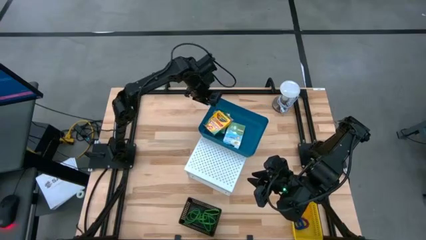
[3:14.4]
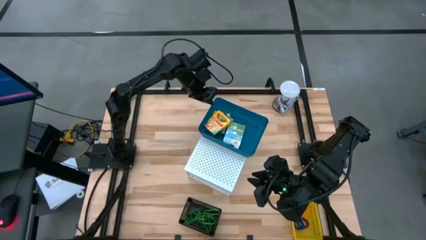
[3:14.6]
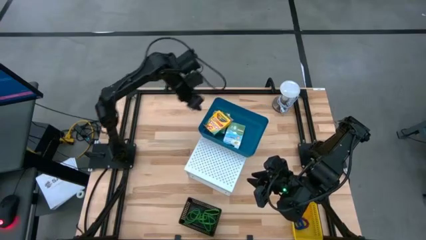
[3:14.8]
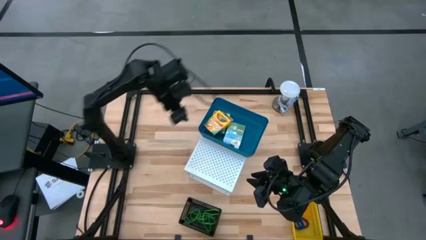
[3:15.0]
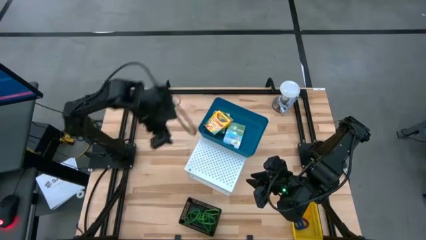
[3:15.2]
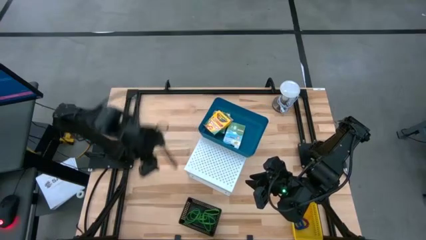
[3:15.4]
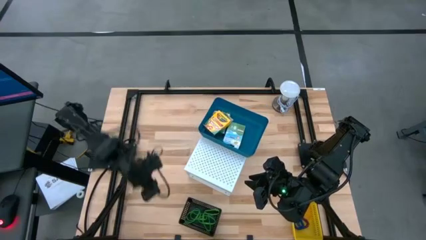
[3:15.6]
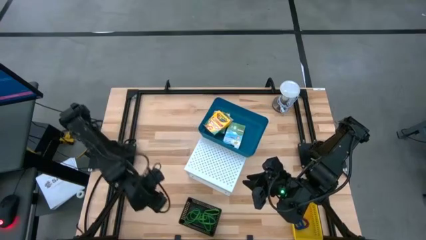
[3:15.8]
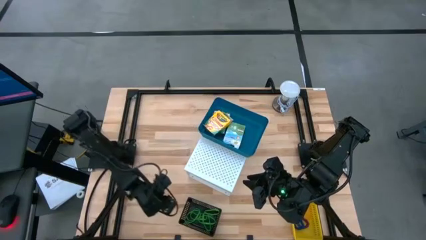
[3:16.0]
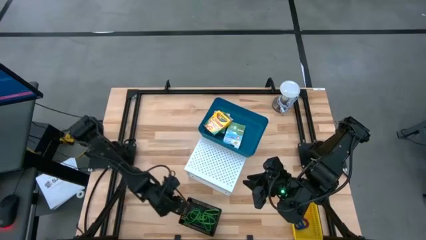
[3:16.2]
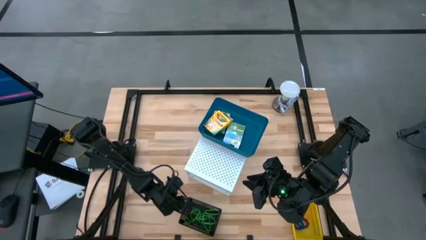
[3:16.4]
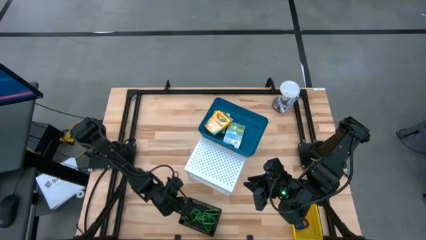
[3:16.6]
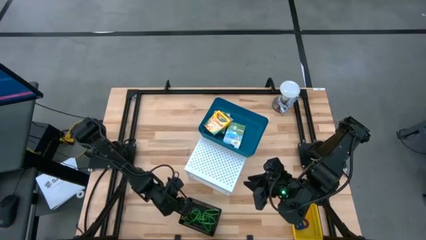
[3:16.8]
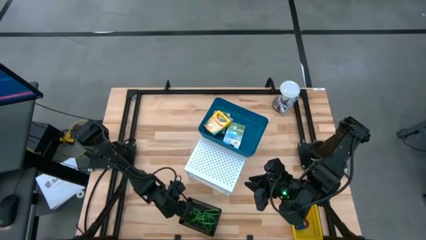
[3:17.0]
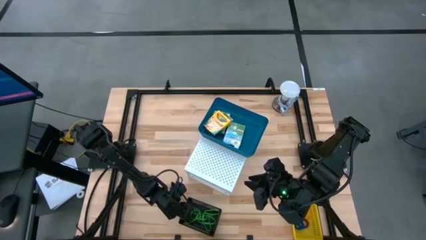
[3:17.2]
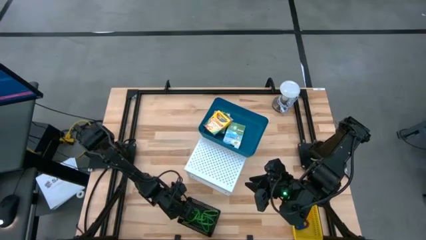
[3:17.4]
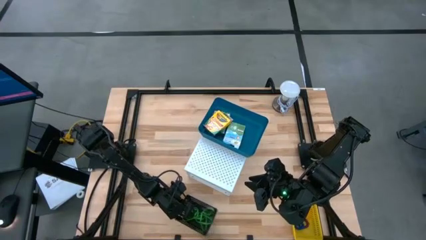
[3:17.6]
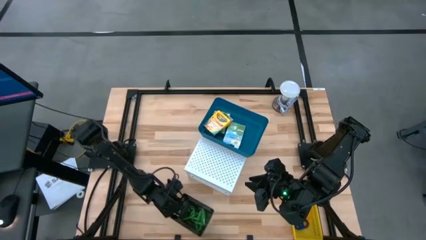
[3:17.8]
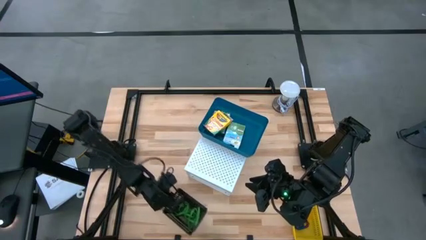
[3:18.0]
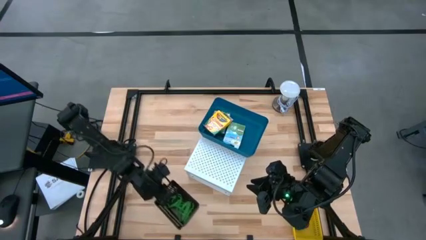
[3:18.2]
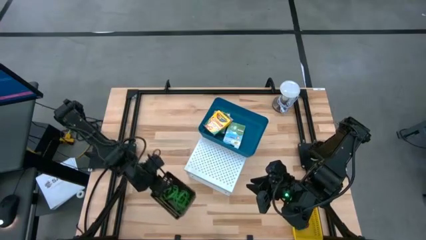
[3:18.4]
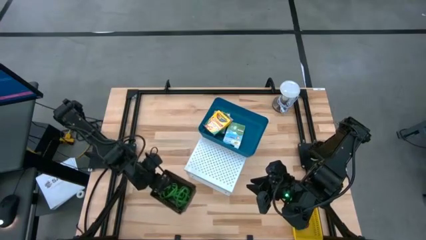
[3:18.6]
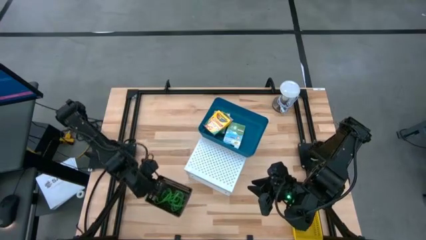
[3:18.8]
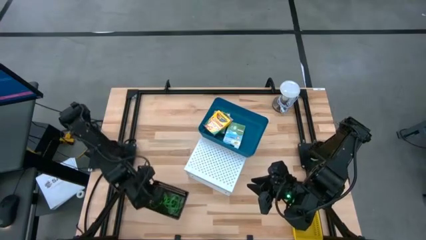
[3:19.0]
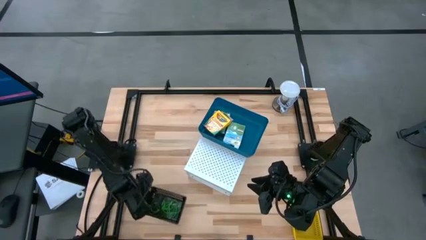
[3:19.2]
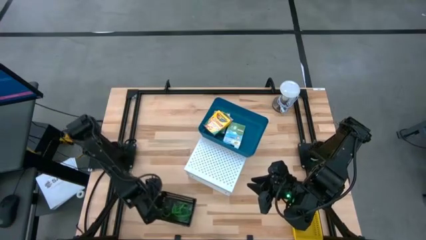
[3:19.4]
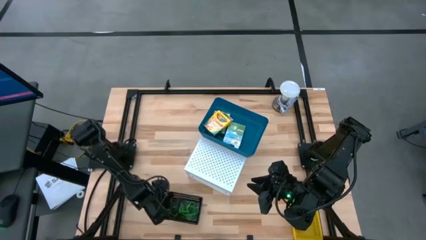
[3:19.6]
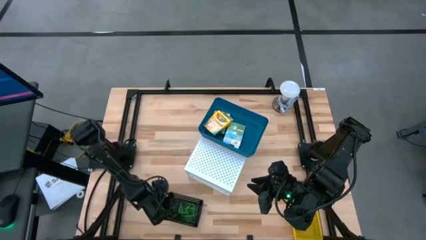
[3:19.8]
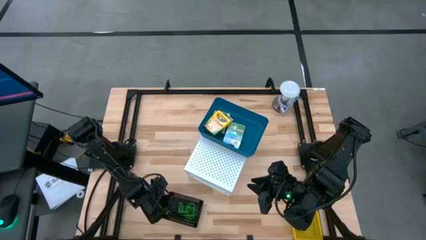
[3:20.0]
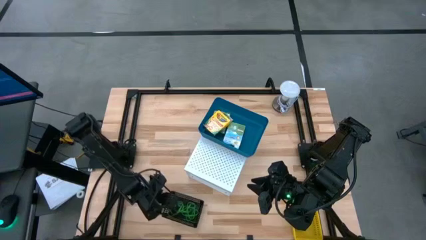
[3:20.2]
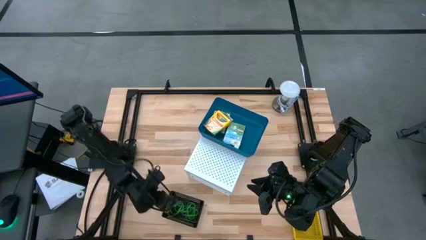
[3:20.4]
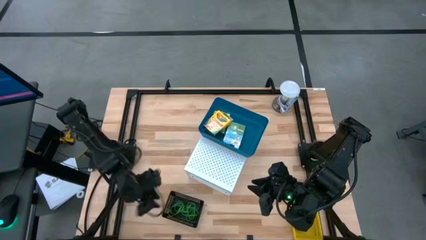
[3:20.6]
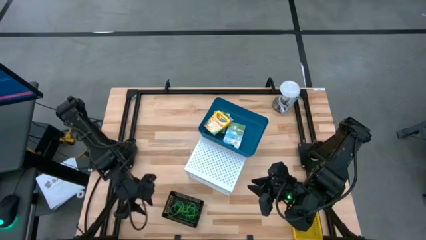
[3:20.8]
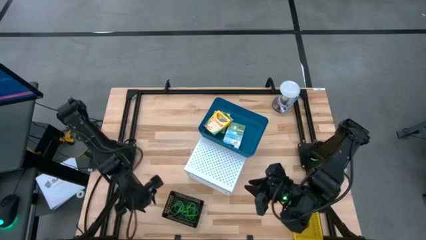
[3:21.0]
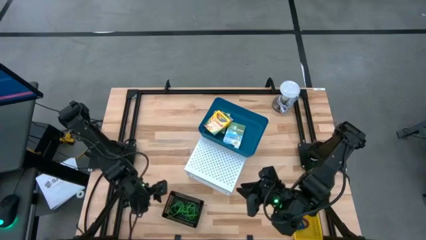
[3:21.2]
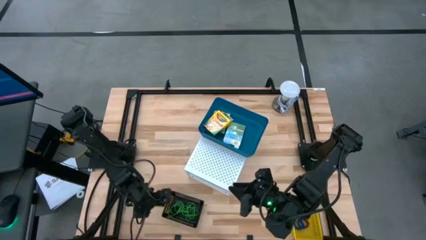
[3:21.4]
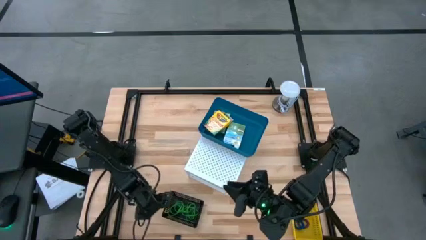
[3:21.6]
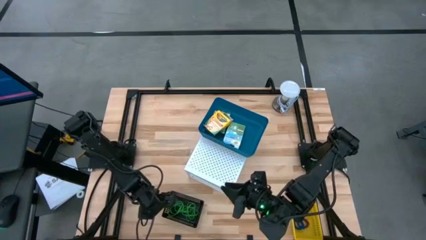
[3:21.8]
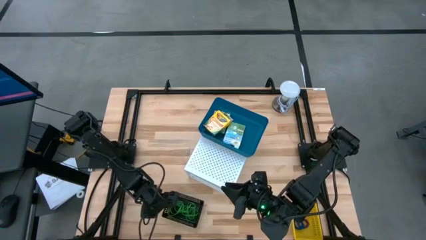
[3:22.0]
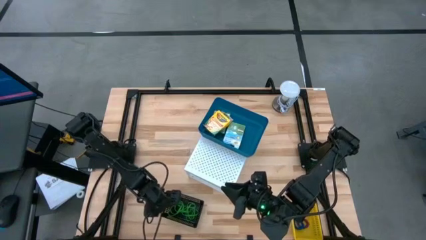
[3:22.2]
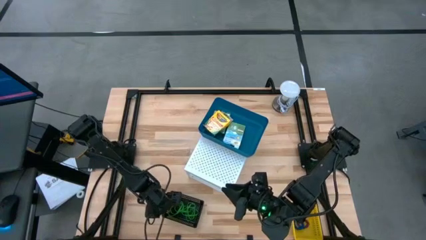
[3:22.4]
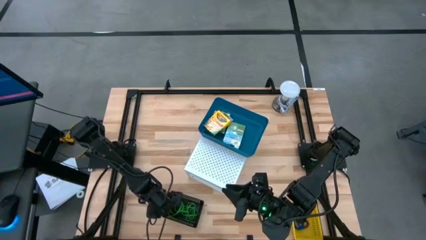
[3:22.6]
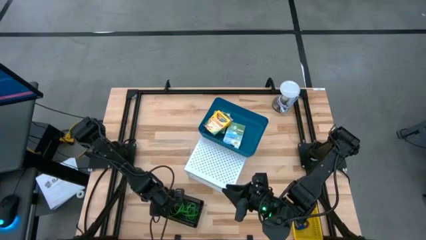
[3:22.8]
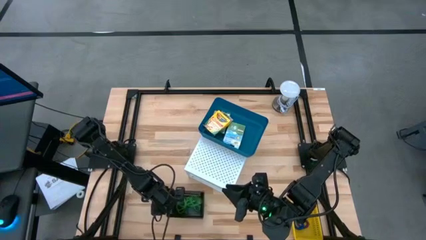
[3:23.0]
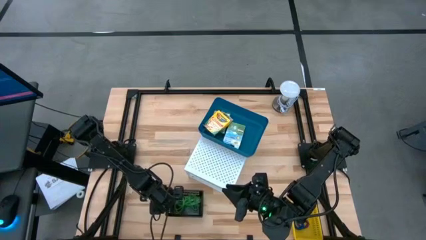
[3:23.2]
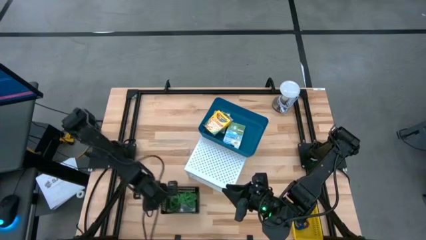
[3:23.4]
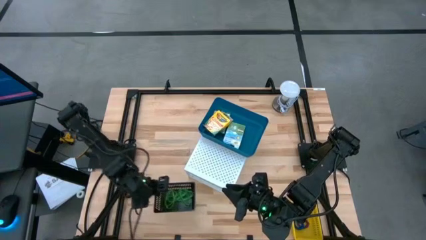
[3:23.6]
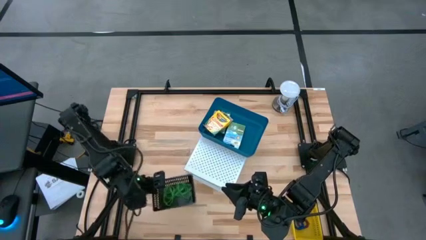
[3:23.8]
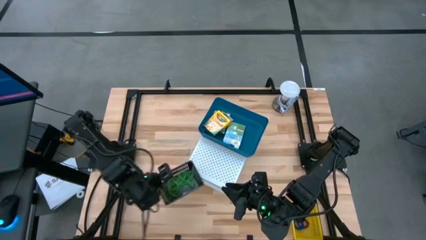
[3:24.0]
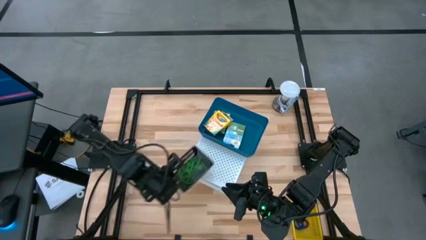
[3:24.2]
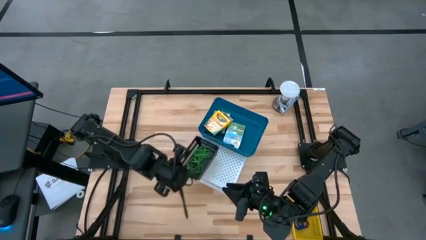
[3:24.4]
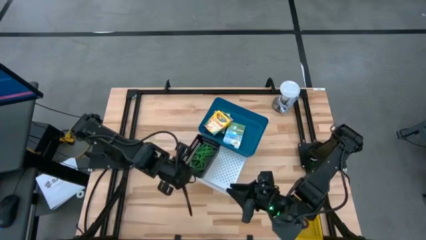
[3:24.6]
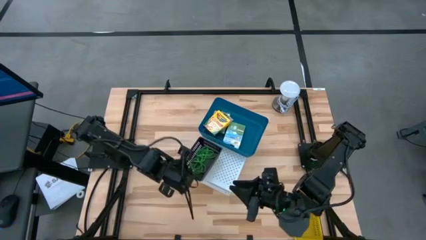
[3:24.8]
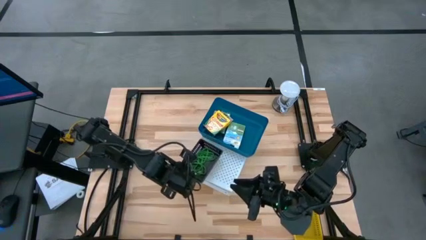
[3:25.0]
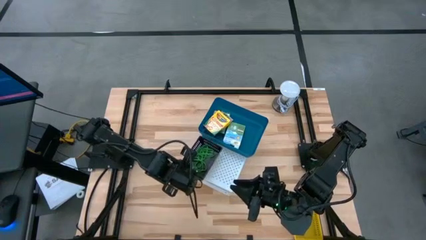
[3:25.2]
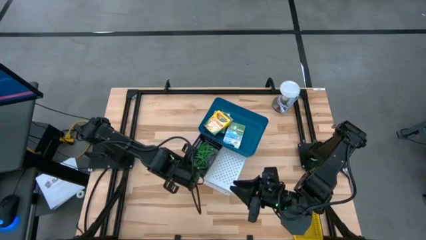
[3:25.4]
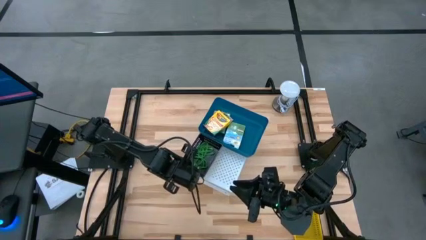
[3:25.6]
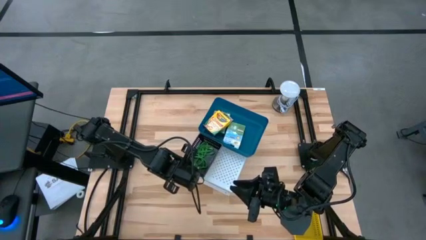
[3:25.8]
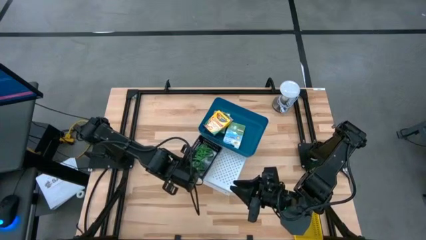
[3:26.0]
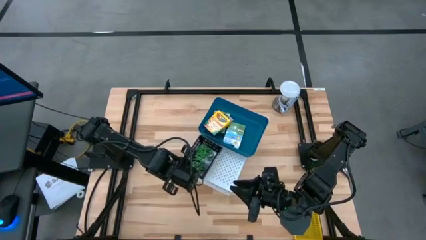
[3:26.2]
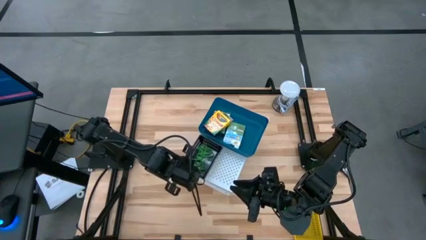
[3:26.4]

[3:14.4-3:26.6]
Task: Pick & Place Office Desk Supplies
Put the black bin on the shelf

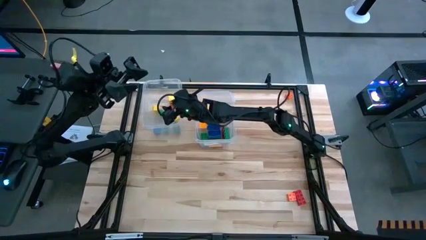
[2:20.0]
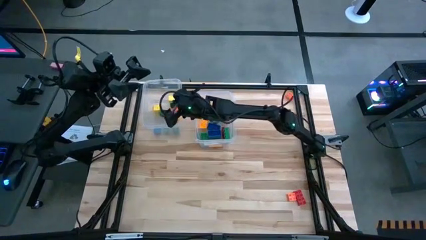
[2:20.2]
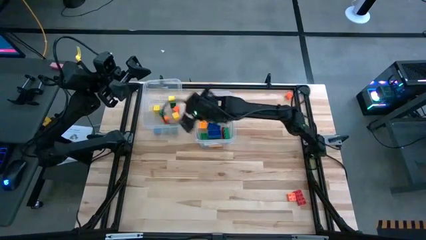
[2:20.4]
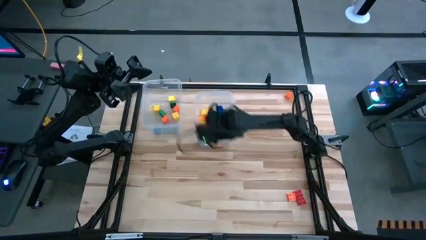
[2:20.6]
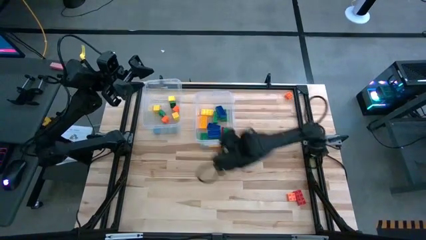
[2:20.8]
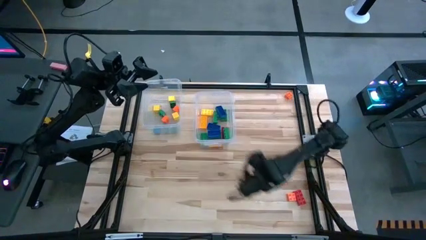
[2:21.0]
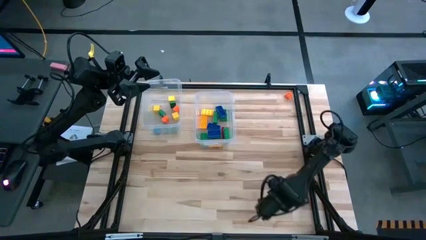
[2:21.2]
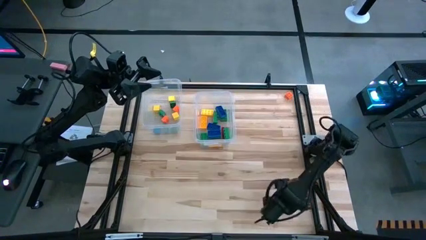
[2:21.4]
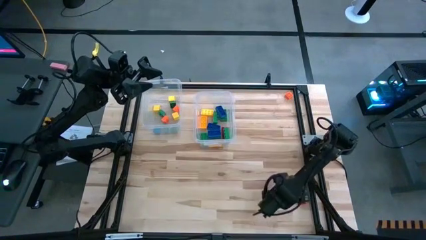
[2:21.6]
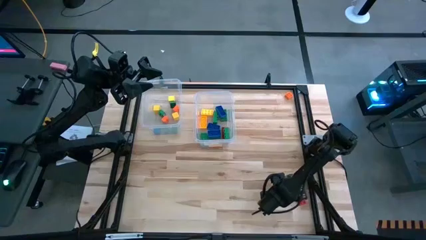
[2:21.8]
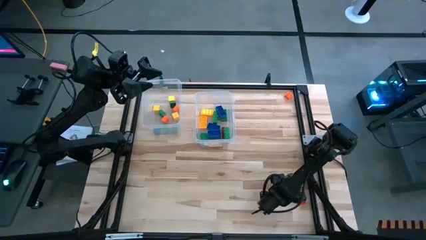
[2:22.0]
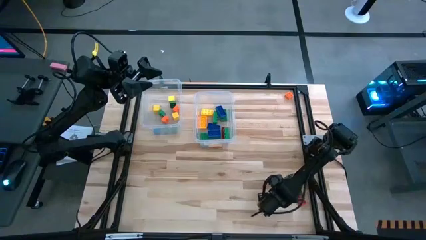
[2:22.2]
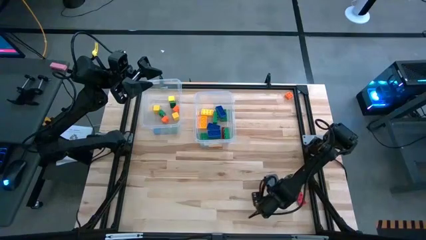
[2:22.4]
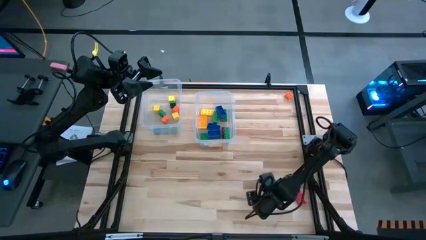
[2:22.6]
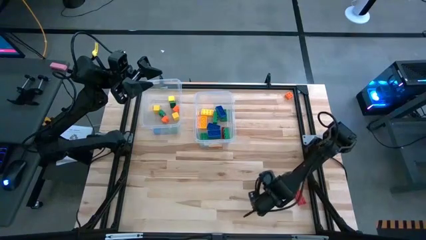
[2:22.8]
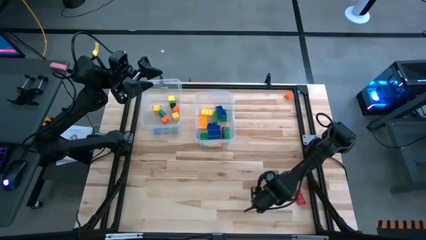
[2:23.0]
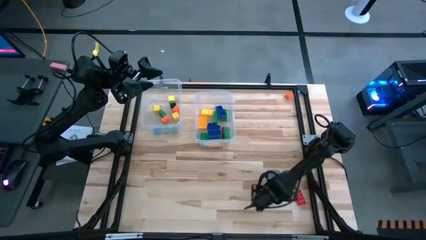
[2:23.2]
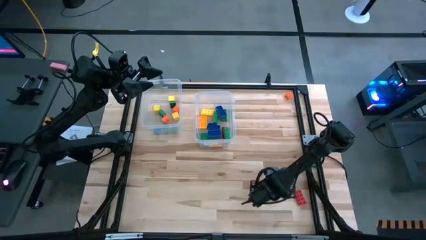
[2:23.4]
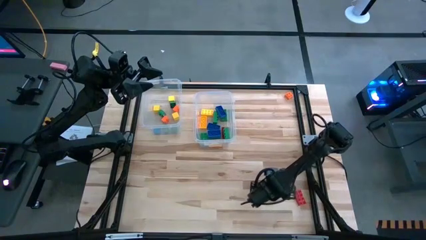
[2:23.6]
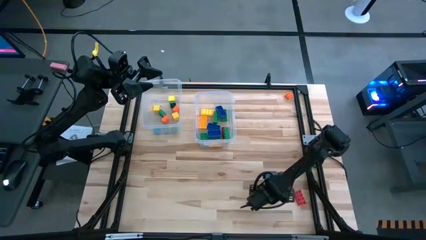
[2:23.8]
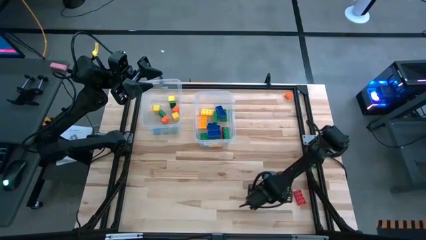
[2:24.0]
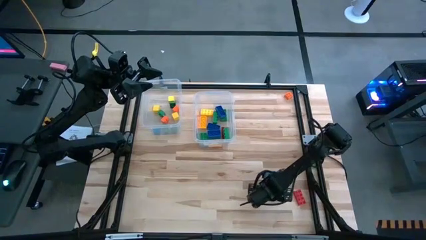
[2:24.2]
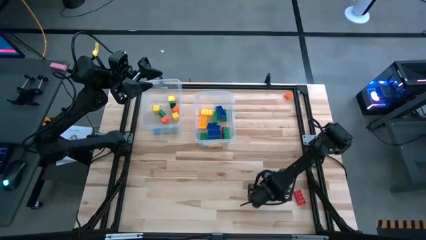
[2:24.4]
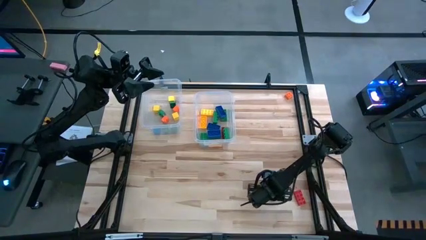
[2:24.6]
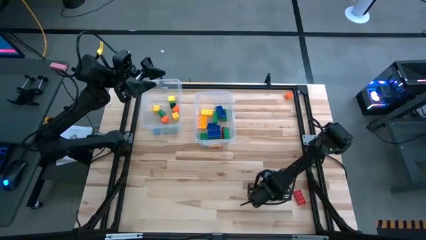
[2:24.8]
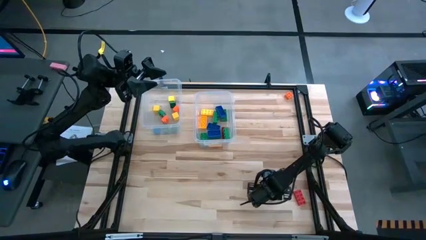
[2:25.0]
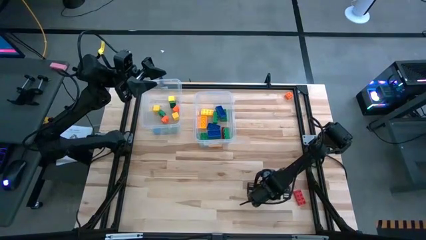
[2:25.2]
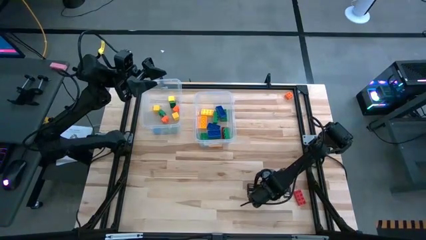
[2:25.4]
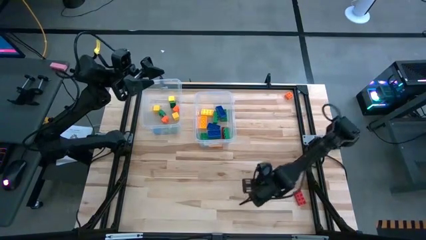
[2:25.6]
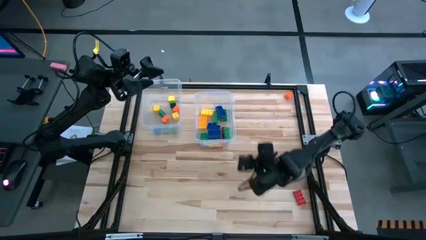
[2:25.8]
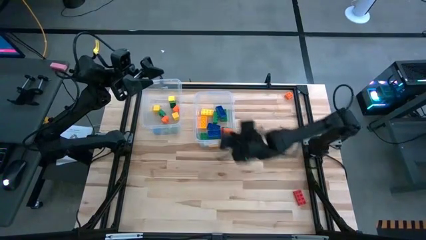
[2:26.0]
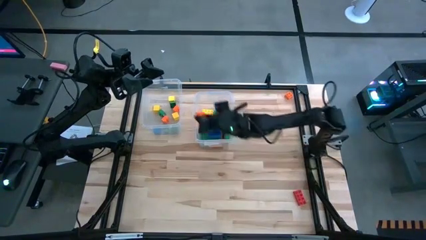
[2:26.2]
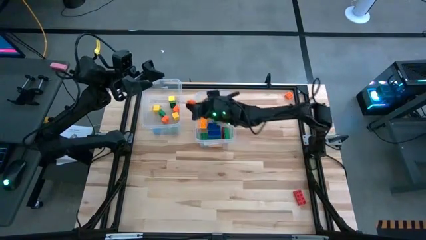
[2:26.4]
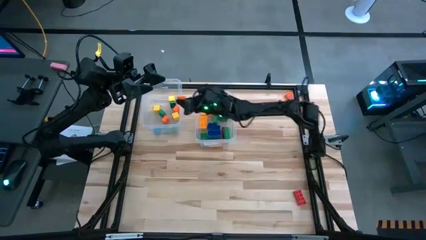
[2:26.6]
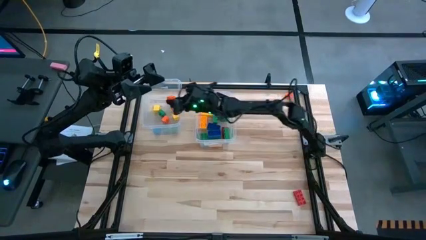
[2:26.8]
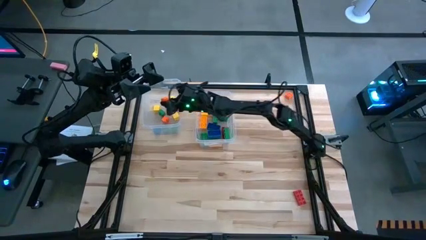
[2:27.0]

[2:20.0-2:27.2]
Task: Sort blocks by size
Put the orange small game piece into the left transparent bin
